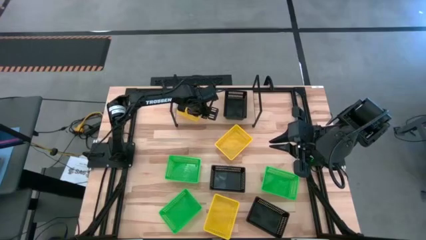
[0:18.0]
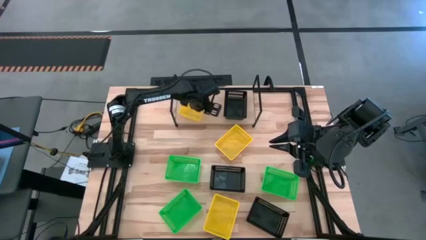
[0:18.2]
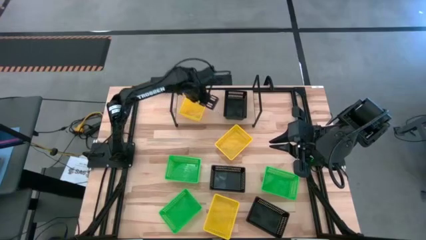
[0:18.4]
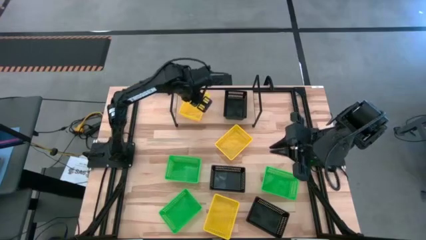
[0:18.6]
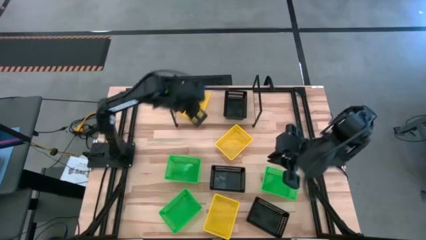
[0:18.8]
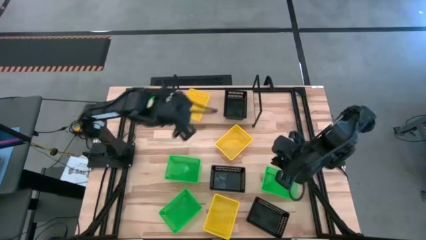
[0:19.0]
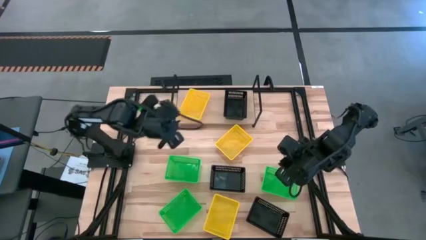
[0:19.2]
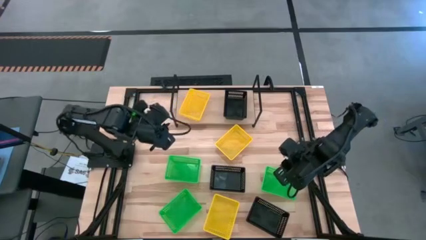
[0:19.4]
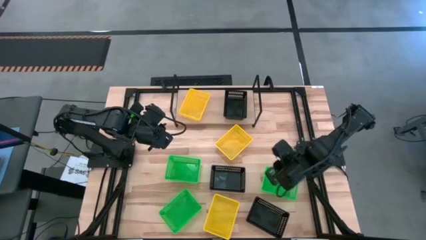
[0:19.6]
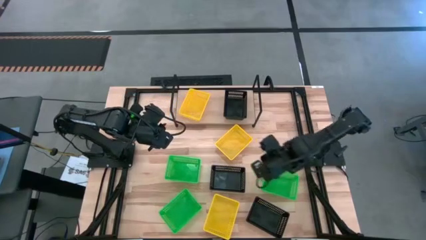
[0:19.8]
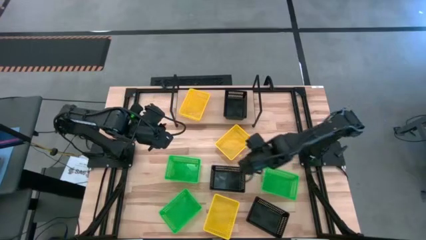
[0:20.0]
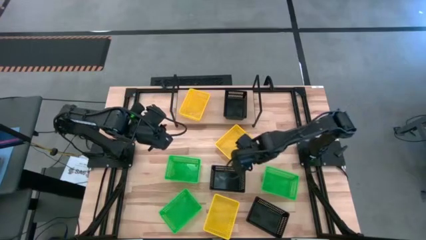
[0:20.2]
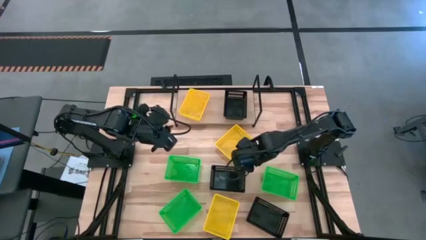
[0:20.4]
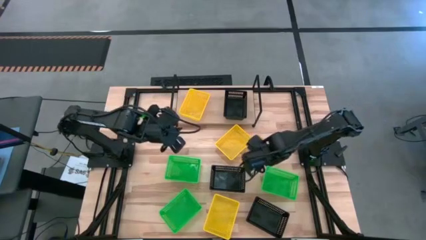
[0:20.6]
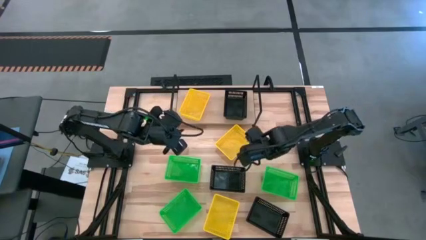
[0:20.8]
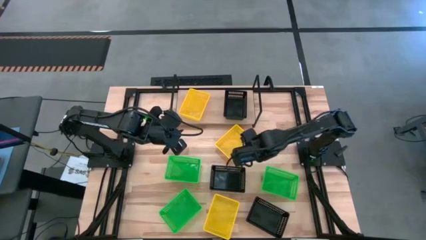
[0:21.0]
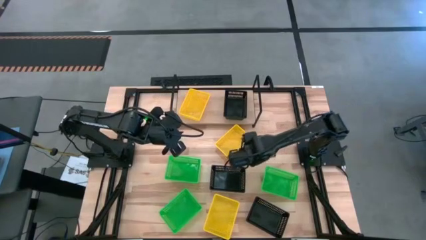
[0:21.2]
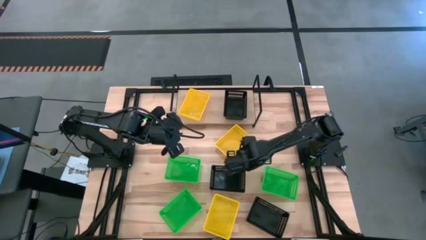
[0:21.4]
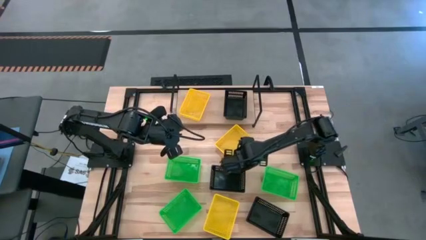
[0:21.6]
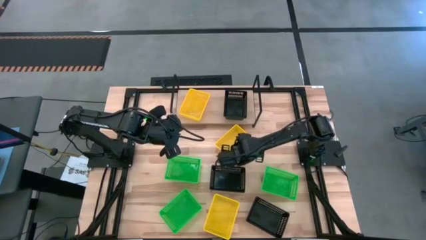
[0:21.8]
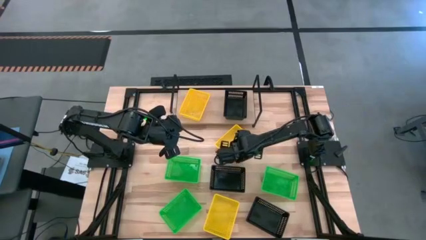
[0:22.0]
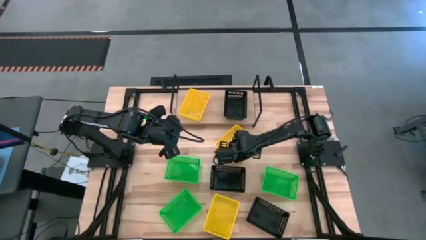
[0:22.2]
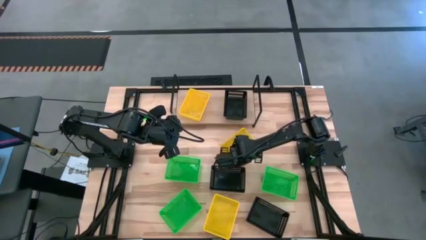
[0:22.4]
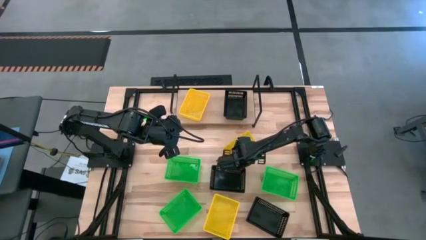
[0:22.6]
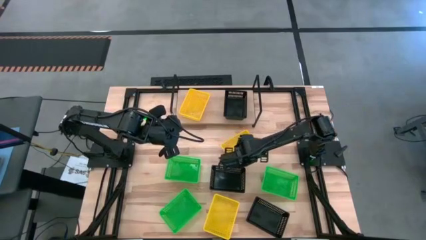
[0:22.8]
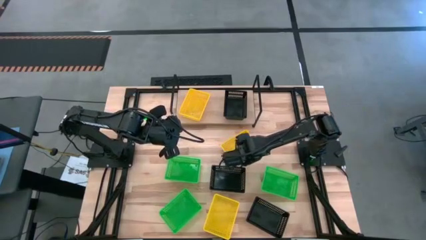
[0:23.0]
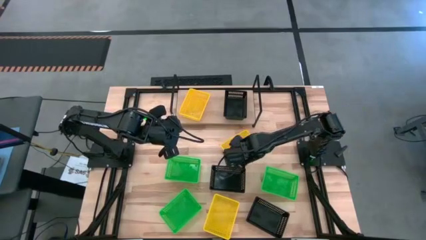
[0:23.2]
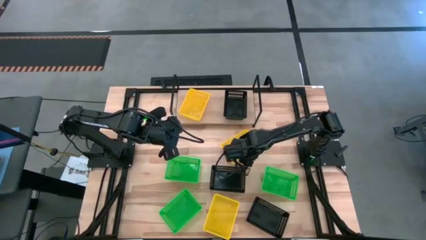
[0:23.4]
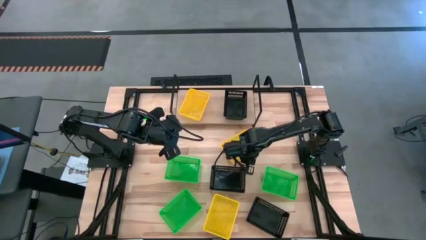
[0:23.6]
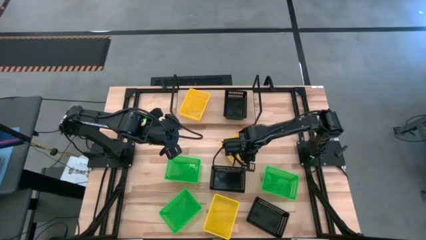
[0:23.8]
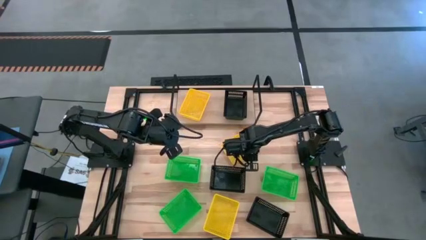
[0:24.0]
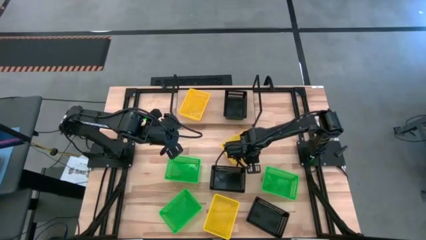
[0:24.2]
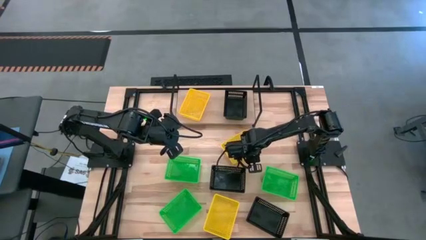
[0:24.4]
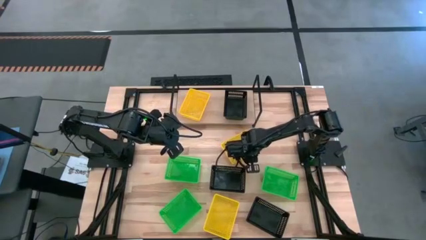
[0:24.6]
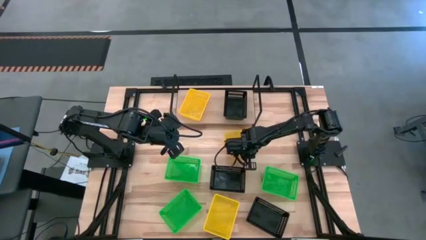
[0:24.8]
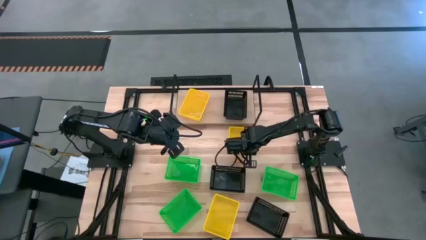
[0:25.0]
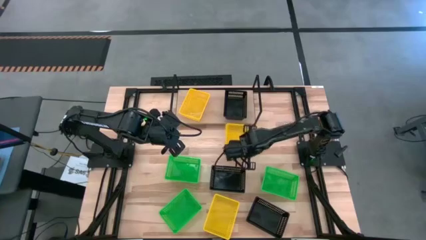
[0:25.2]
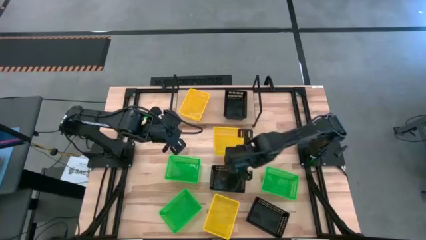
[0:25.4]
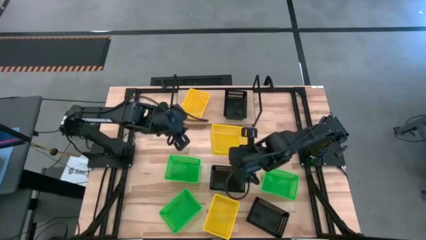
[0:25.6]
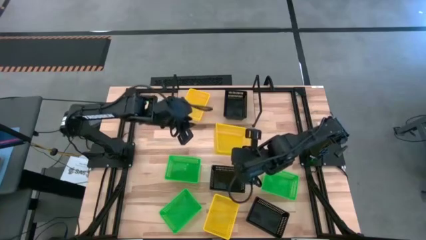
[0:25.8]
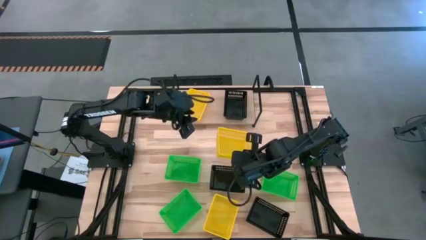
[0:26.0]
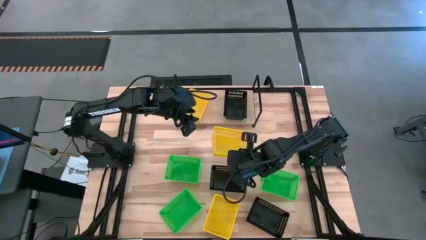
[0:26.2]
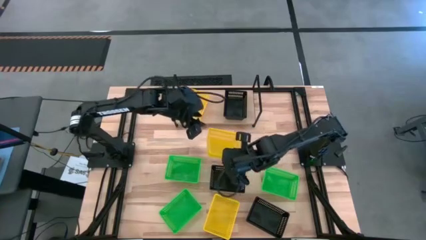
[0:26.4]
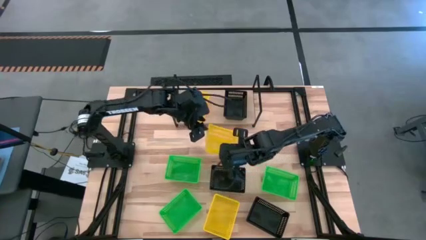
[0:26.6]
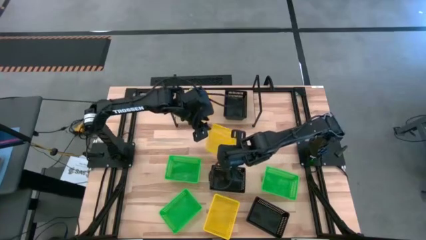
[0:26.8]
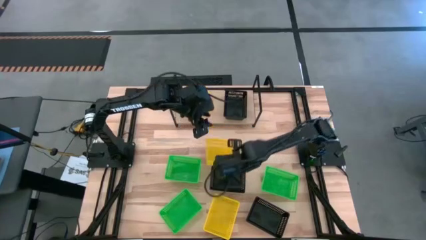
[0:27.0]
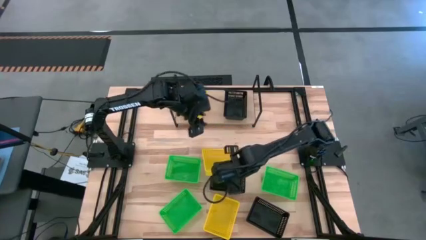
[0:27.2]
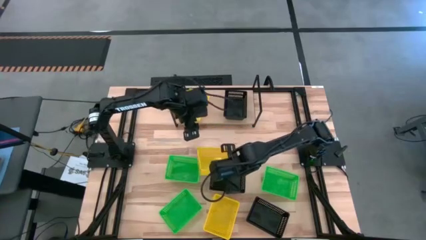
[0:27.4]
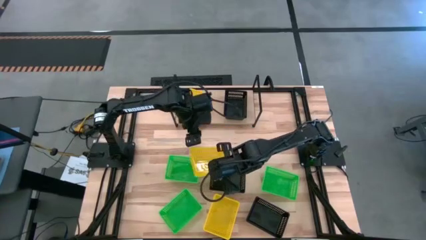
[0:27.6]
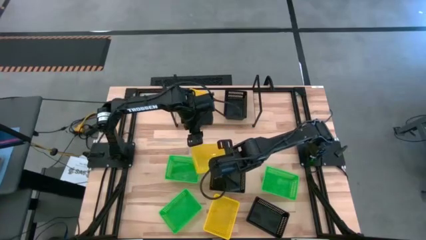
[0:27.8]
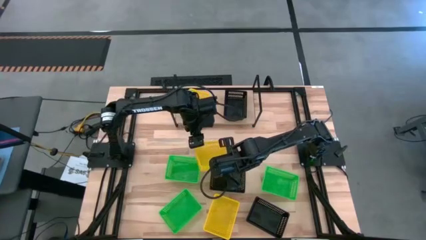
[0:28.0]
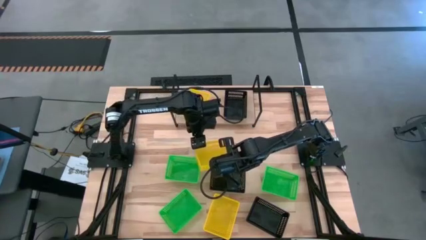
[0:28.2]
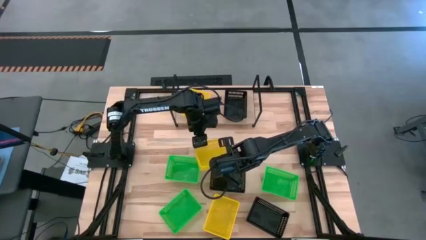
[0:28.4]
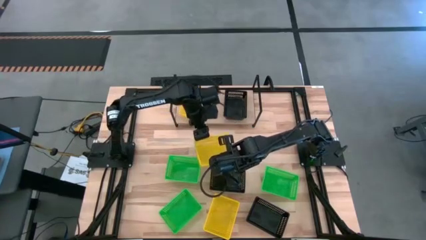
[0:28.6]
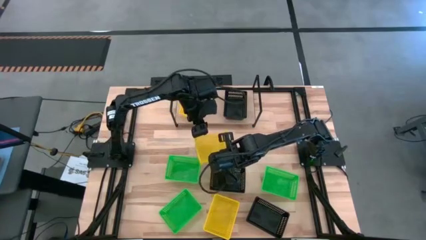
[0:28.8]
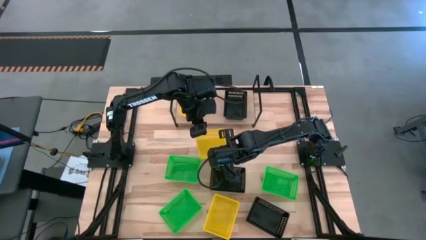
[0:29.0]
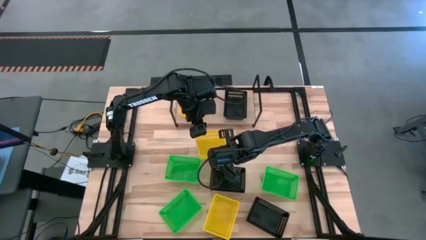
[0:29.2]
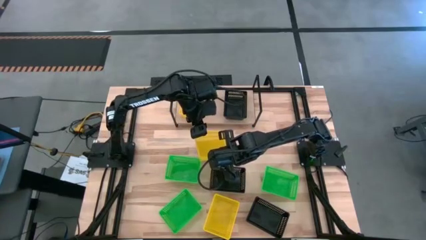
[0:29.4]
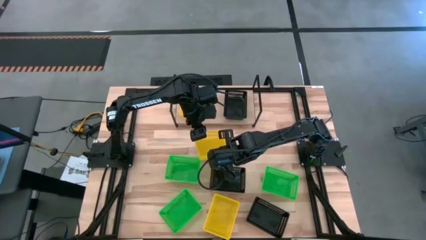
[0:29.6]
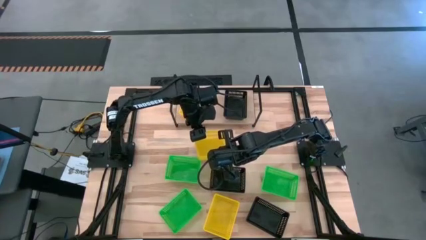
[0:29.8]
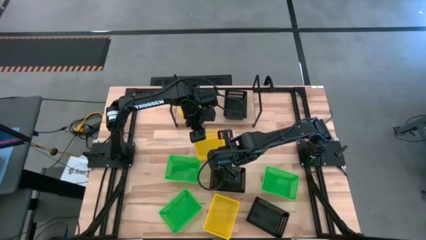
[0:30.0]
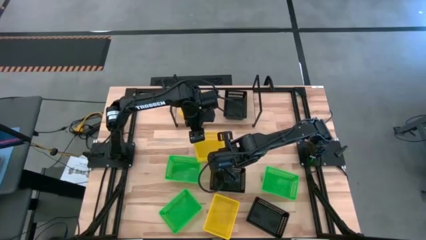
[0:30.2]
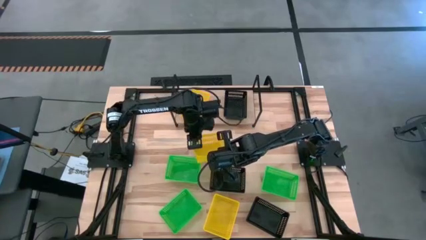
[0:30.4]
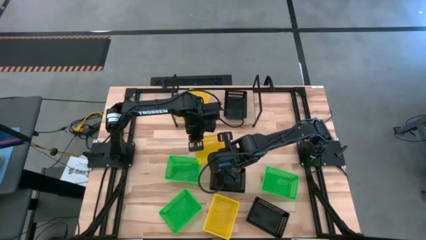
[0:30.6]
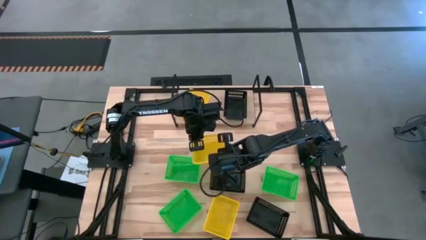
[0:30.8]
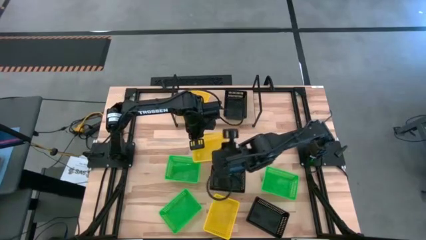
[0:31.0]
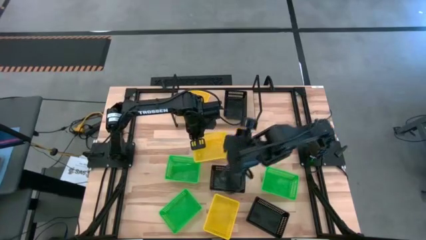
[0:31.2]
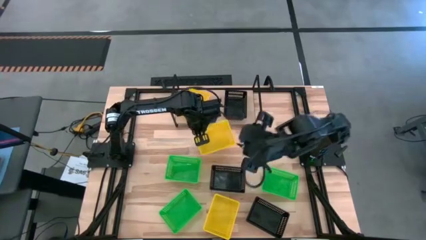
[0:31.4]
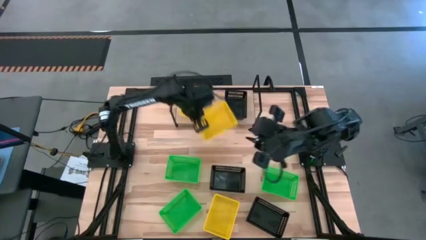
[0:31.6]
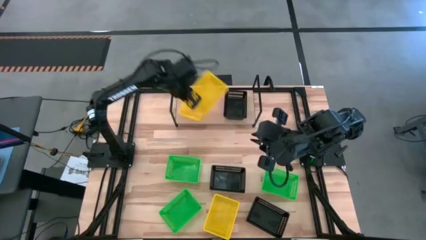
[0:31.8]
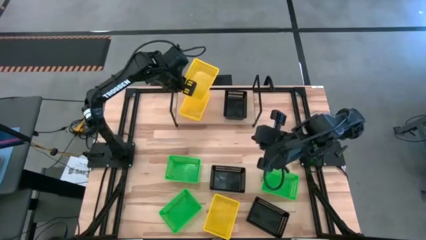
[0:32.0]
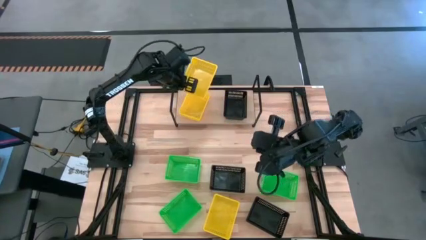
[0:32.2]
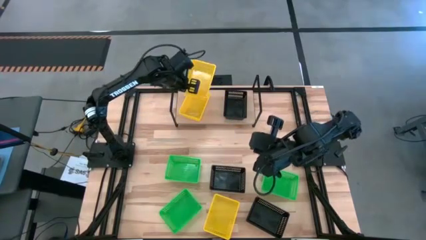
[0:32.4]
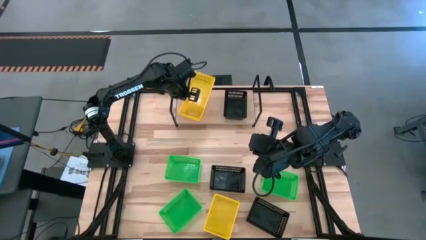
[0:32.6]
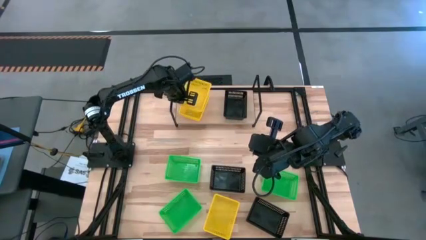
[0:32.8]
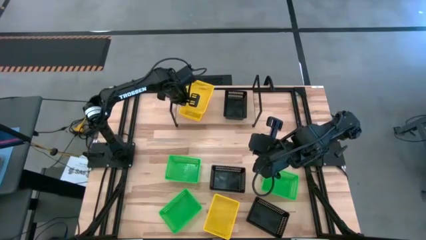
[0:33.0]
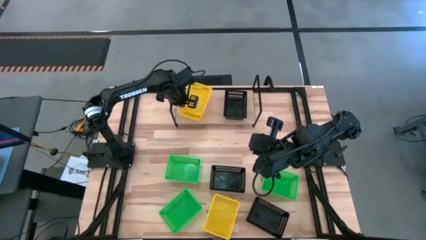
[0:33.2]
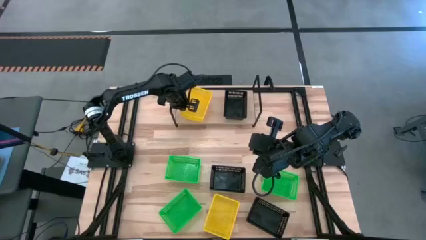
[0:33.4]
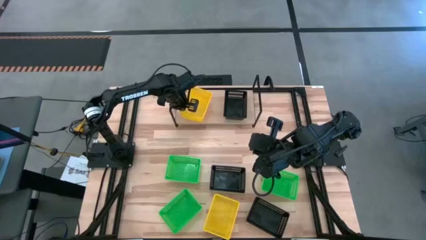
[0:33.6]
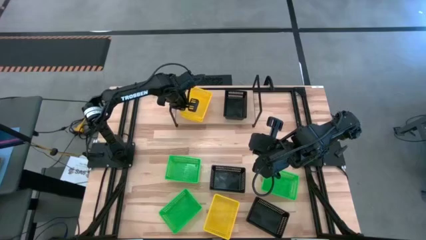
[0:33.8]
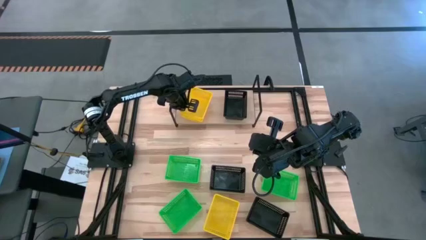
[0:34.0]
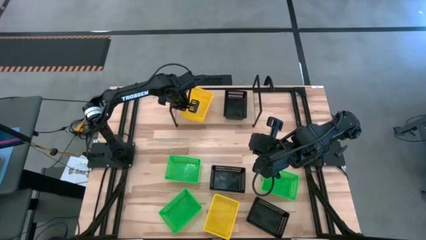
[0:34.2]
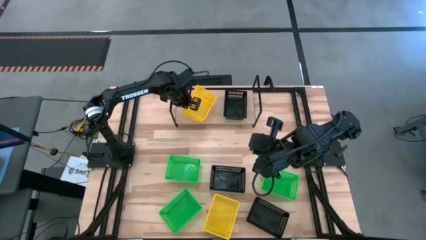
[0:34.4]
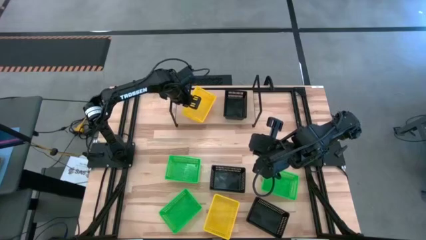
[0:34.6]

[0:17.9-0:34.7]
Task: Stack baskets on shelf by color
Stack the top yellow bin on the top of the other yellow bin on the shelf
